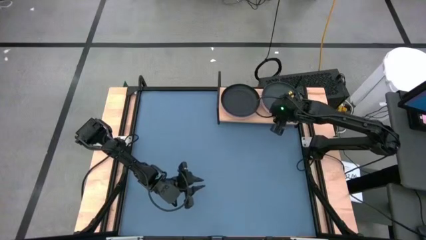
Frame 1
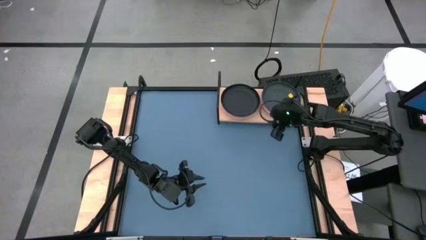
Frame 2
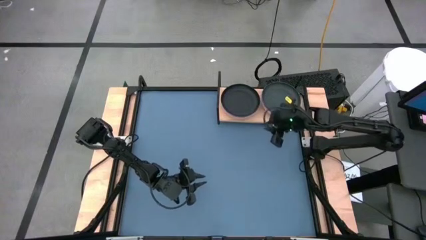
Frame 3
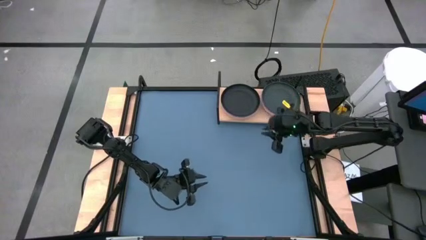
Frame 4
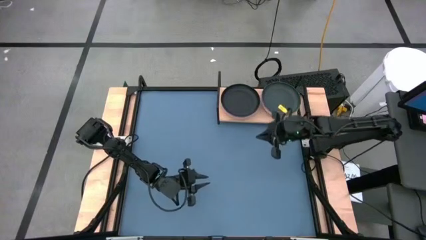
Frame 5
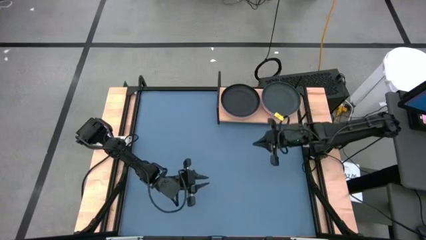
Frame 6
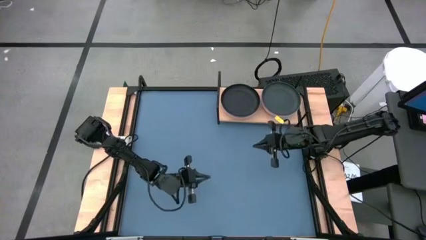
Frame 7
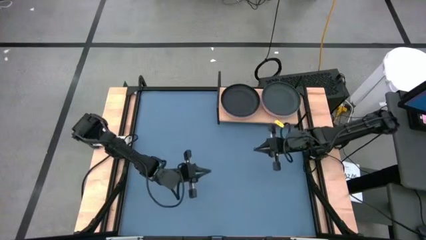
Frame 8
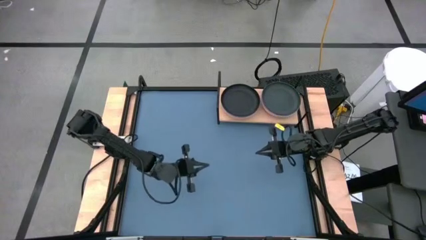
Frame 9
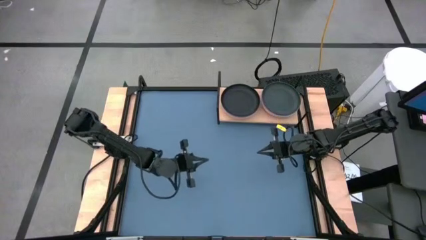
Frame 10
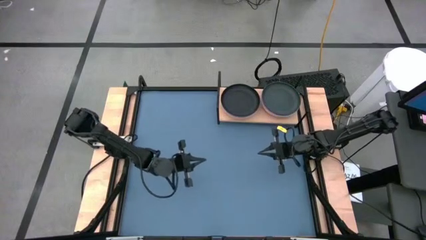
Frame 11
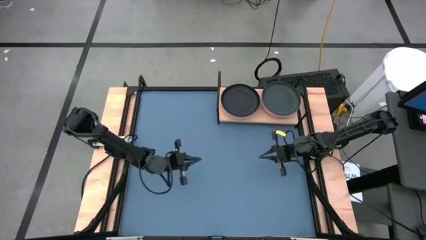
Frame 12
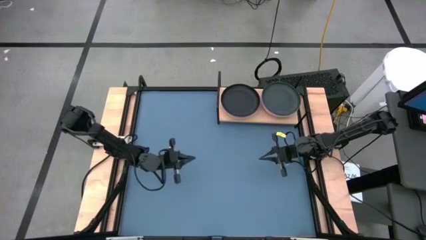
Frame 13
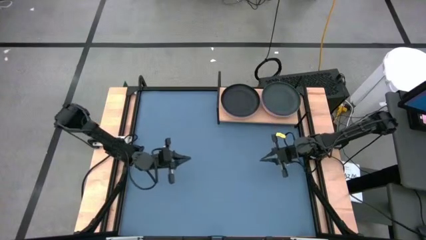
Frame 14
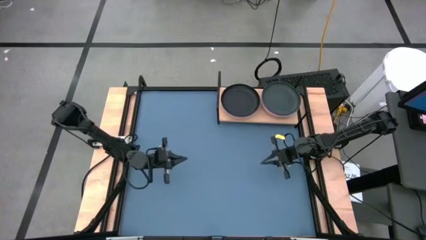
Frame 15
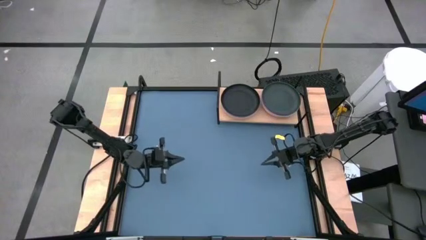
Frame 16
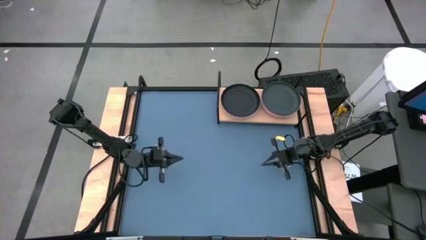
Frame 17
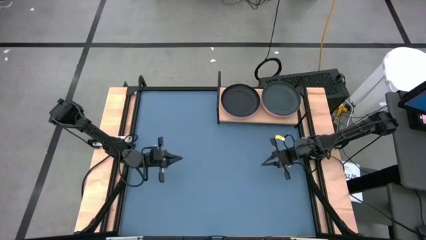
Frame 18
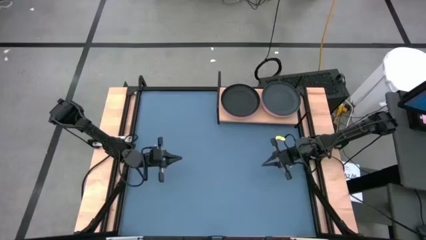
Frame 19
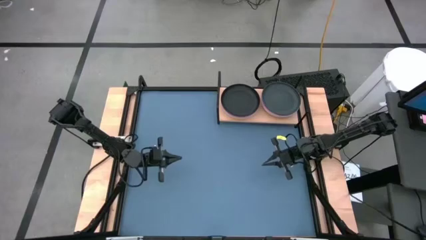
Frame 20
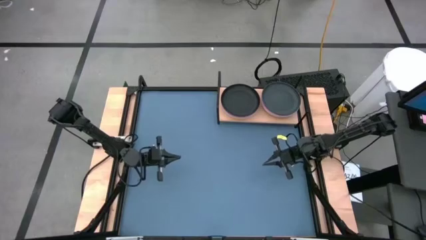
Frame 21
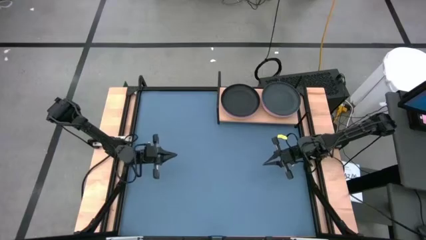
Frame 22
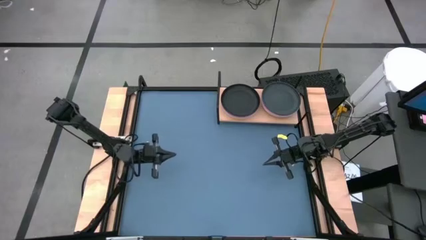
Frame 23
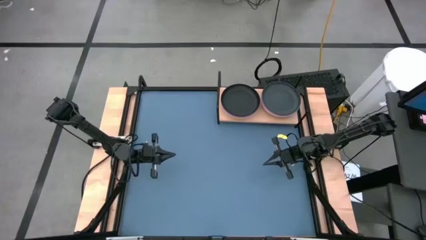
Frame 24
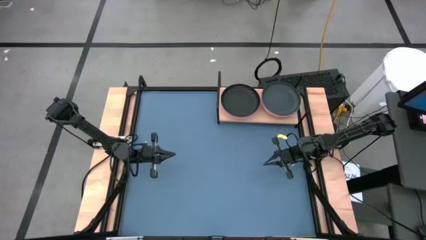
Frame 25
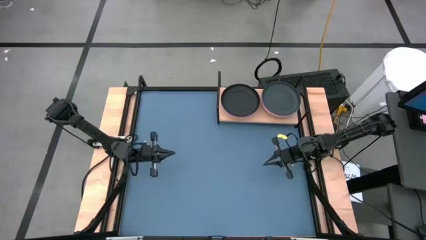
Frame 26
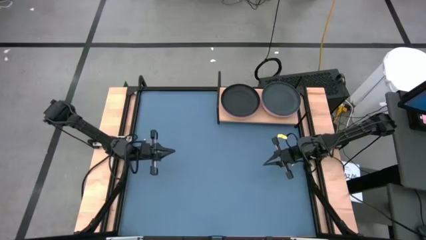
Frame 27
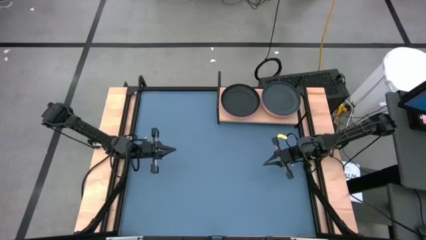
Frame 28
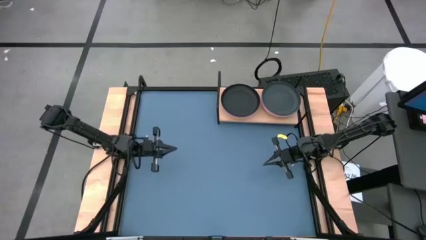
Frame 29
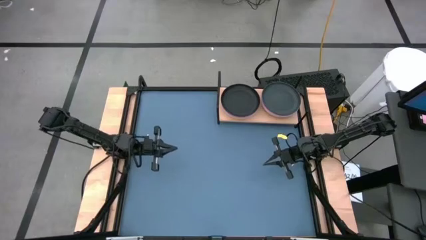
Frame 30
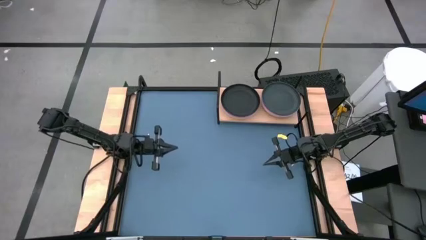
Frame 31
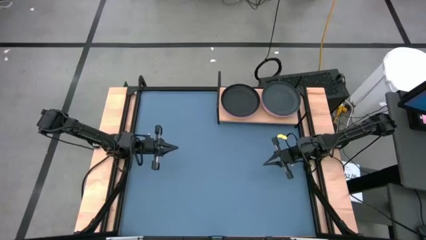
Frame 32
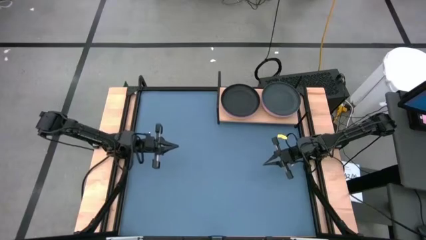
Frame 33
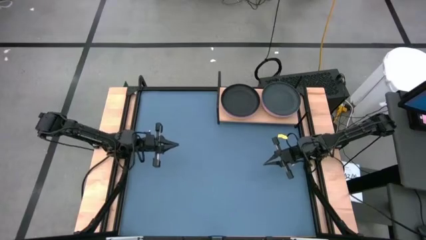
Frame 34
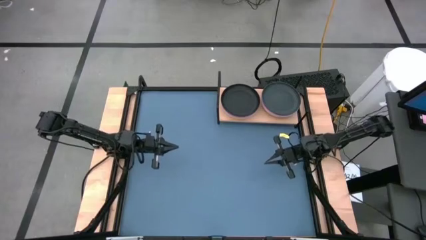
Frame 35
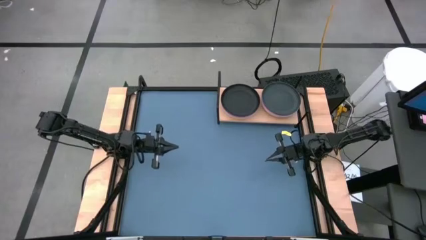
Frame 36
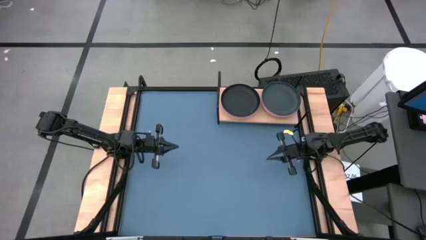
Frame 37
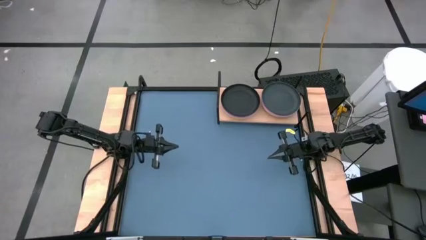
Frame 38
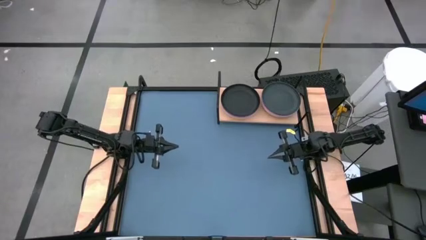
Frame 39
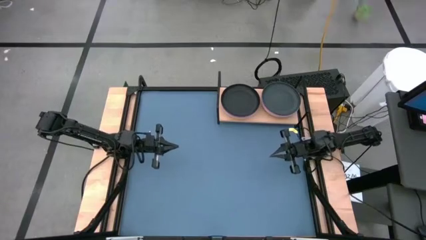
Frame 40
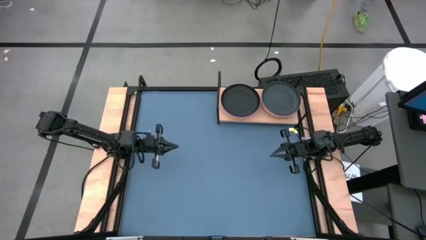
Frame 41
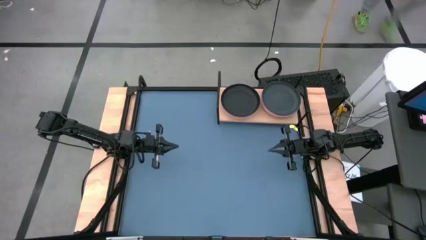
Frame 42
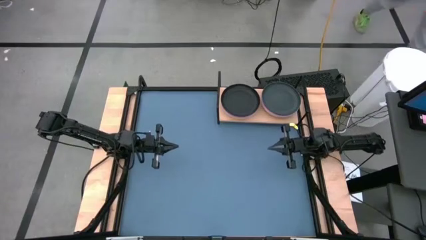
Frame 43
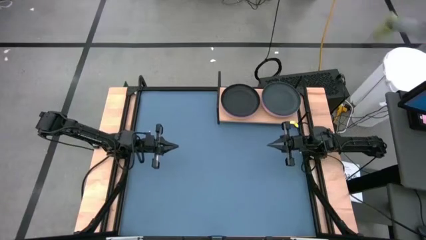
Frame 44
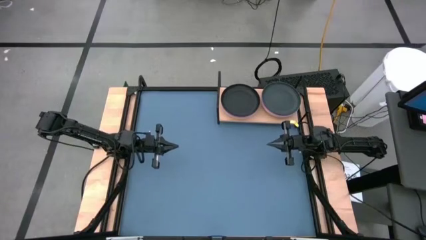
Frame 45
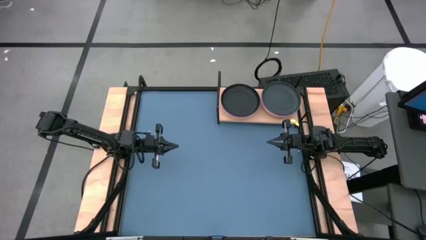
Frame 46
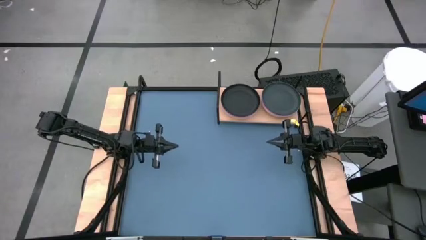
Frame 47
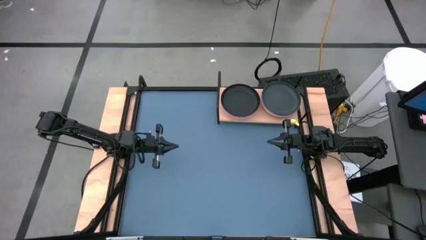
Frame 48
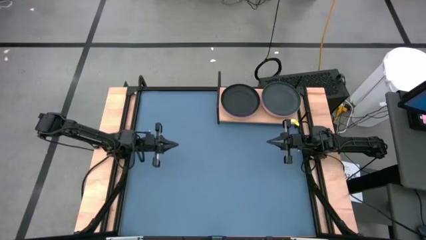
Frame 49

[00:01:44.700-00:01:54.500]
Task: Place and stack plates onto a shelf
Return to Home Position

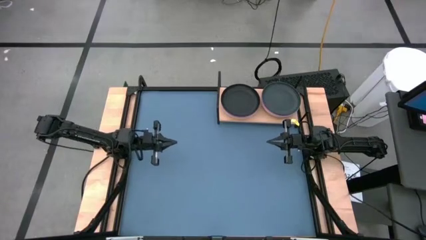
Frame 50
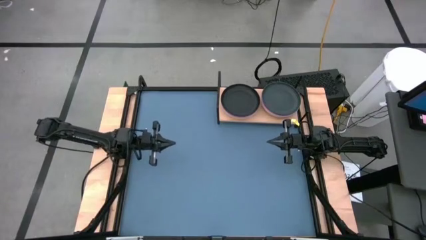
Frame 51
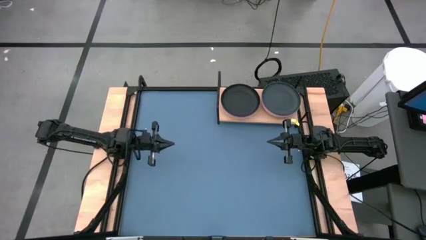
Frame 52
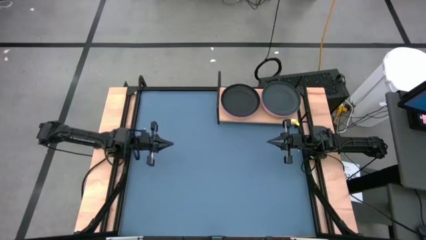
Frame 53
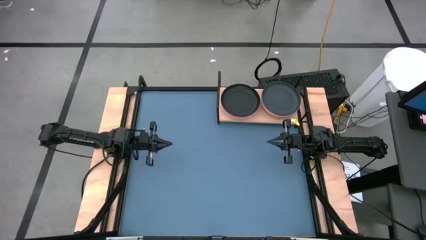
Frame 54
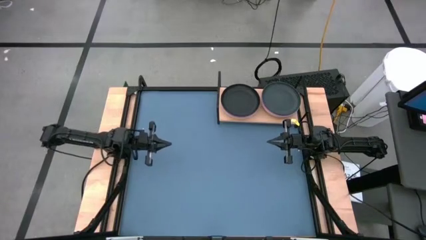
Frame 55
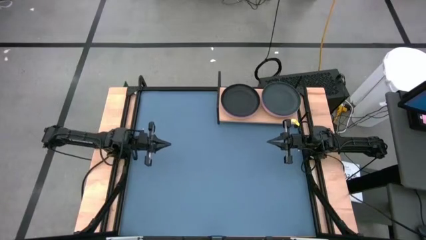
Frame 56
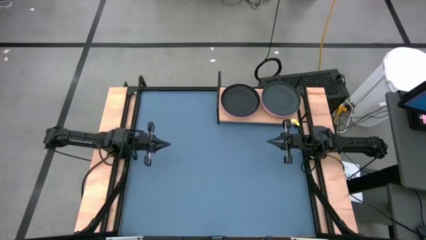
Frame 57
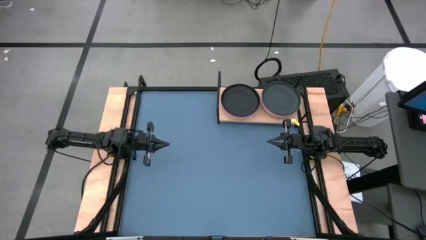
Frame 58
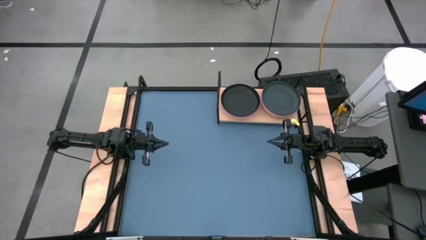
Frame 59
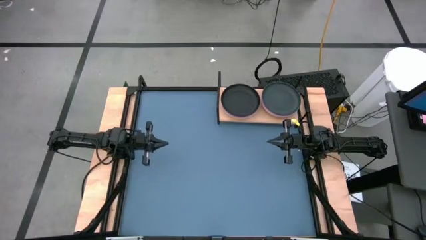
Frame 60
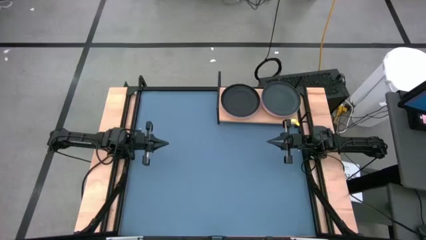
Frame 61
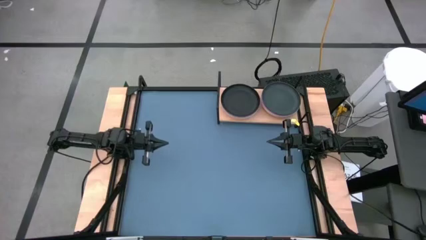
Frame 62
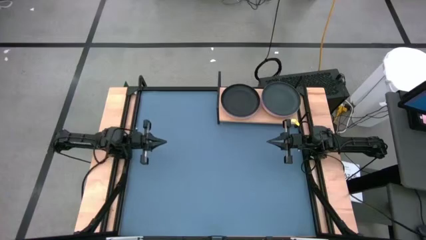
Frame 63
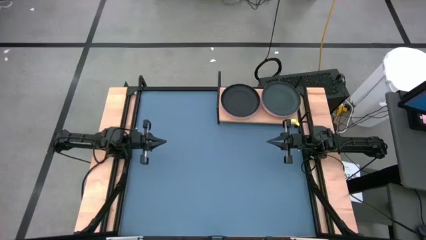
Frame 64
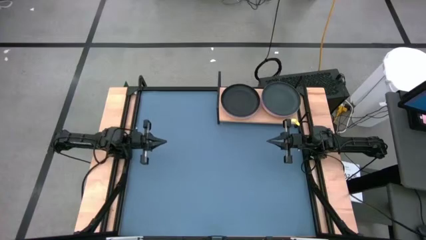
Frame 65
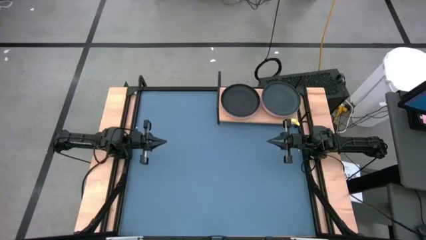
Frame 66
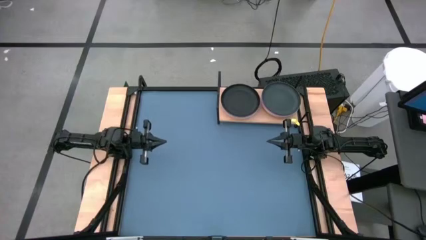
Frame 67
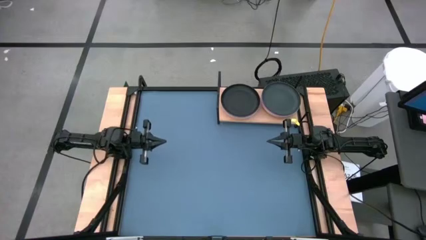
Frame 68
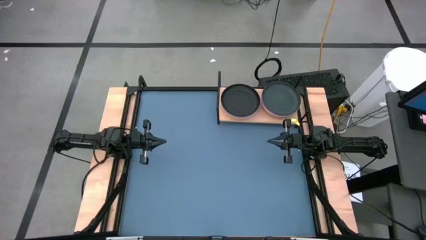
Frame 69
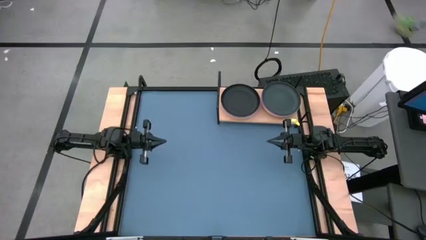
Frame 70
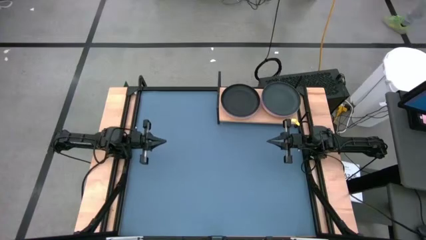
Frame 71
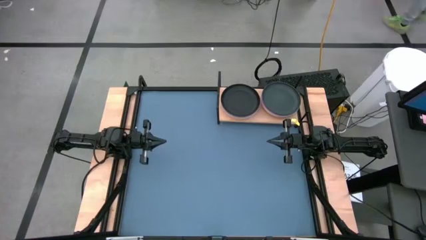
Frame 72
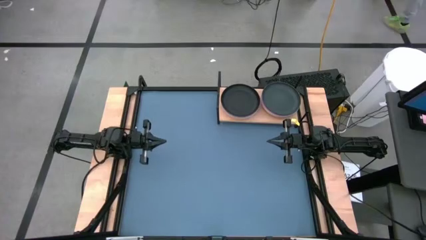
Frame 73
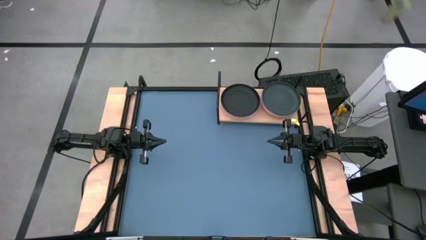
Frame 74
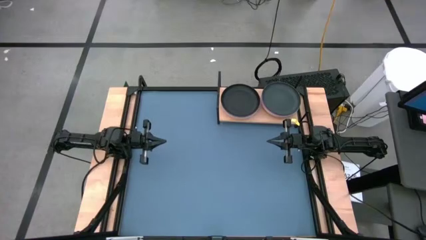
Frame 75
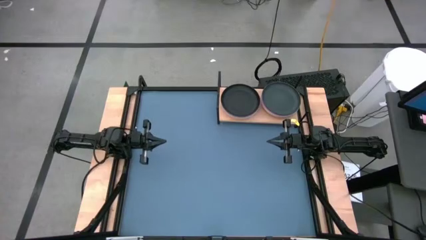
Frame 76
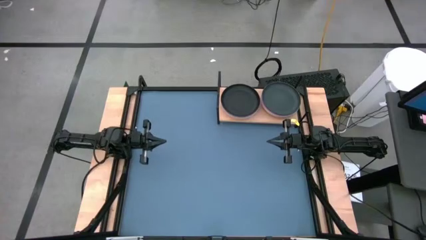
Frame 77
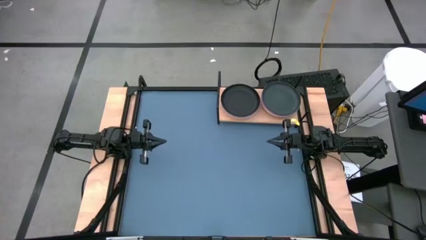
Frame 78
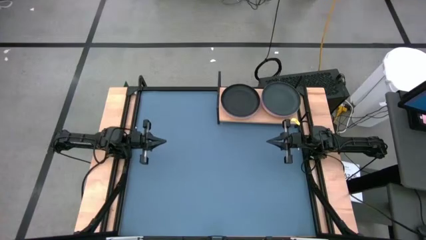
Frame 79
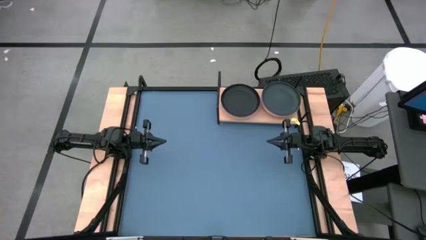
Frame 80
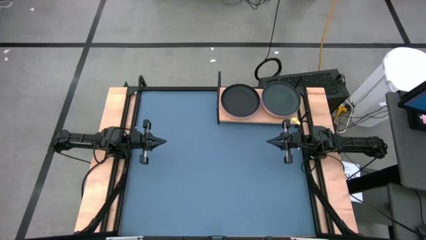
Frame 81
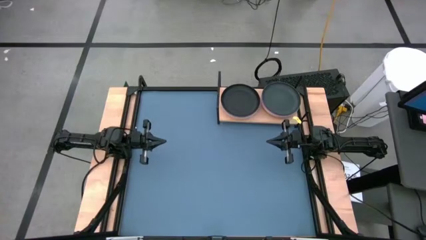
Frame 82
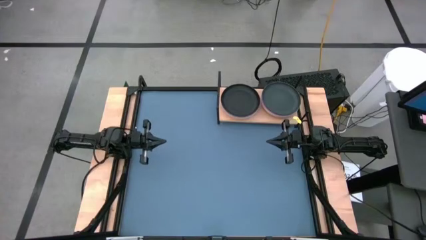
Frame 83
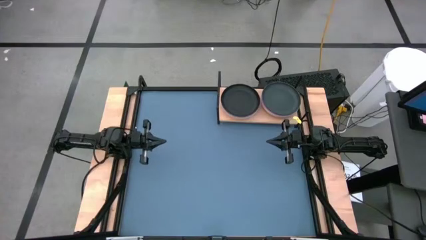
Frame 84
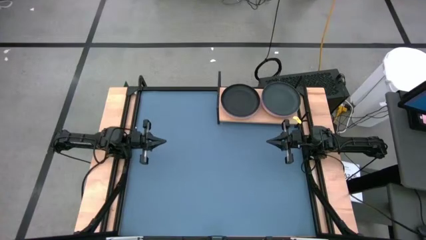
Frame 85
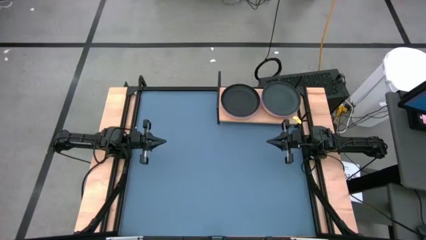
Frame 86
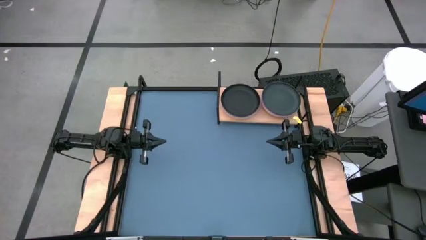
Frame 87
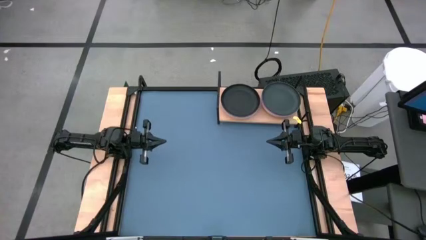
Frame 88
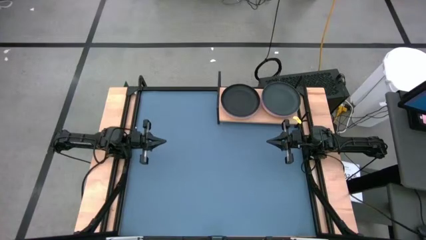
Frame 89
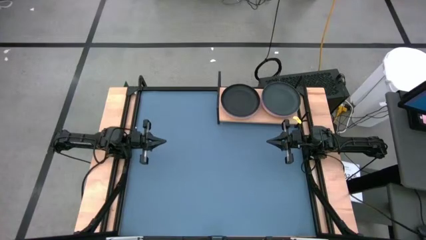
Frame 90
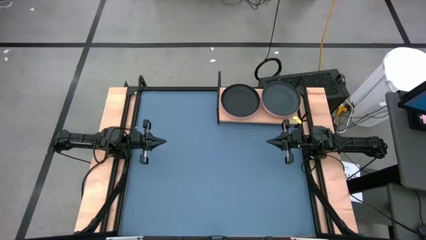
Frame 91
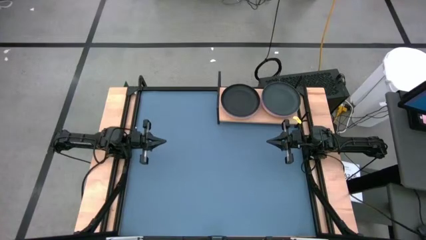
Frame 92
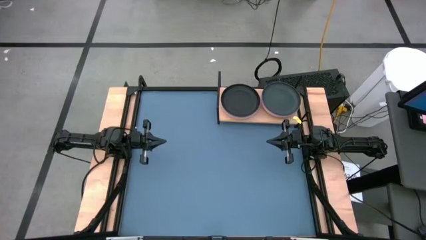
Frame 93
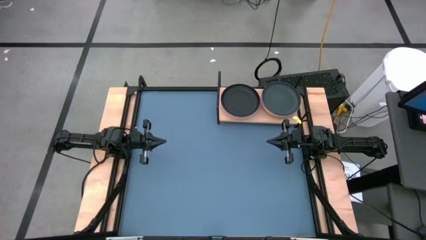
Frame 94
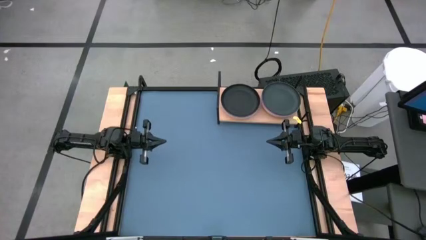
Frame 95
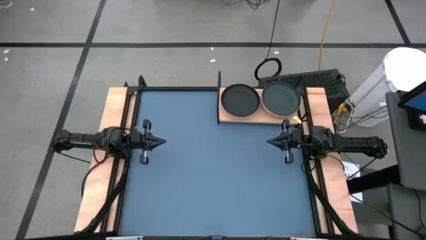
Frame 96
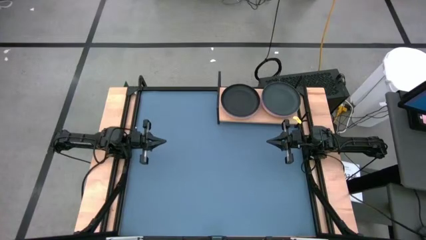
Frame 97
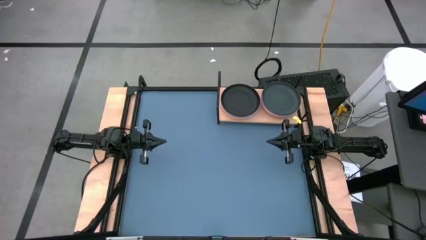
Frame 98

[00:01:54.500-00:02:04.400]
Return to Home Position
